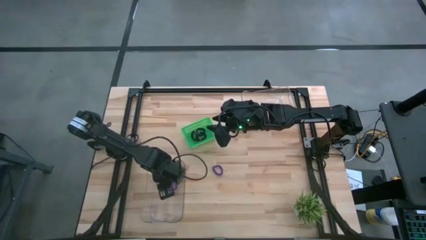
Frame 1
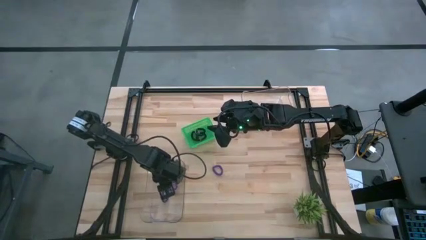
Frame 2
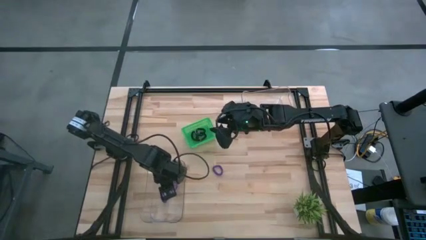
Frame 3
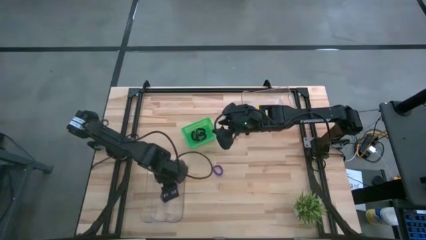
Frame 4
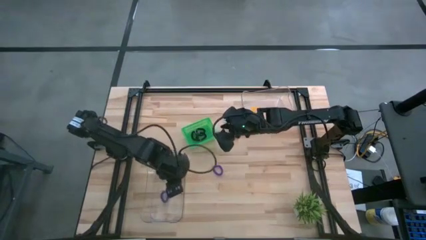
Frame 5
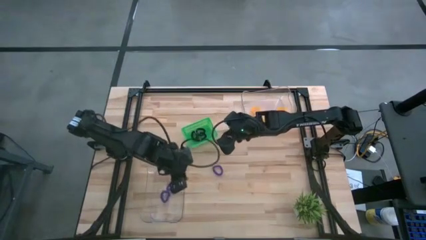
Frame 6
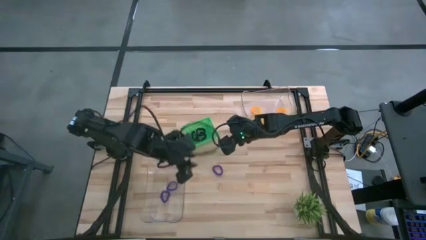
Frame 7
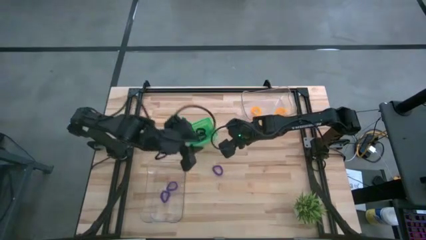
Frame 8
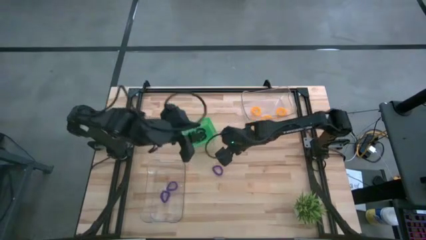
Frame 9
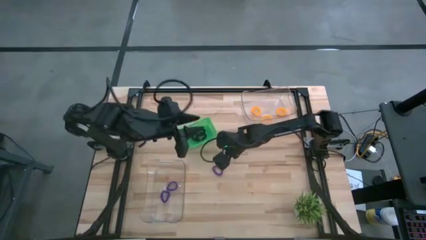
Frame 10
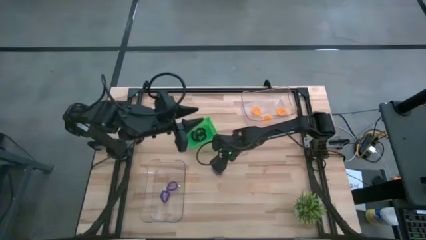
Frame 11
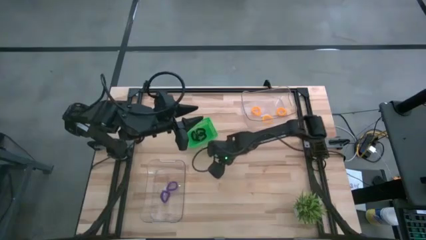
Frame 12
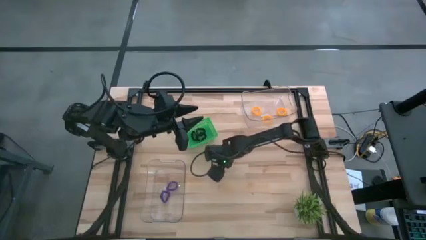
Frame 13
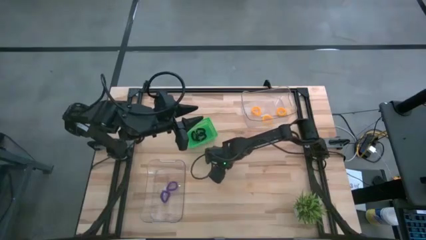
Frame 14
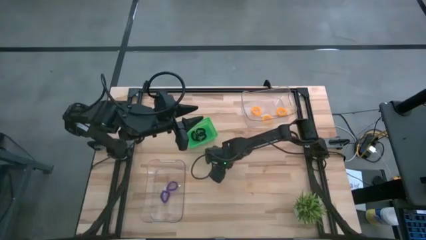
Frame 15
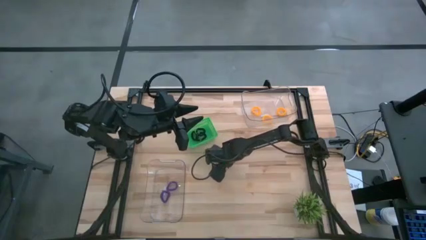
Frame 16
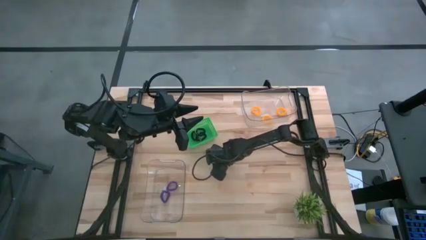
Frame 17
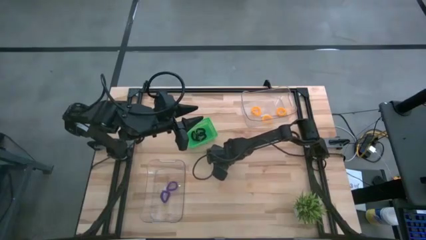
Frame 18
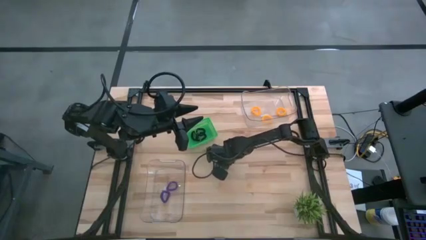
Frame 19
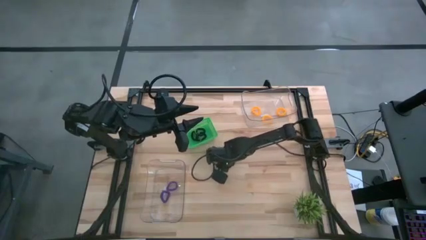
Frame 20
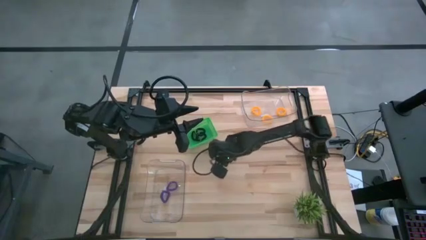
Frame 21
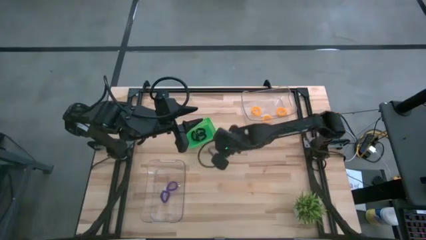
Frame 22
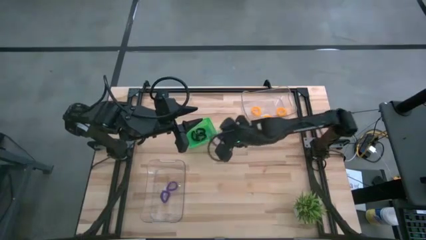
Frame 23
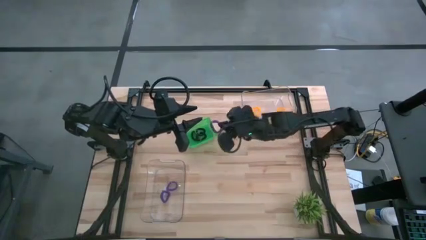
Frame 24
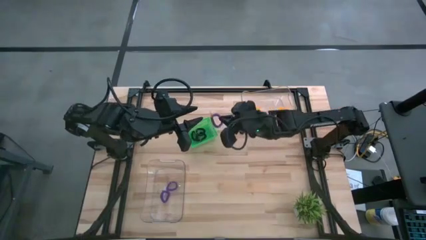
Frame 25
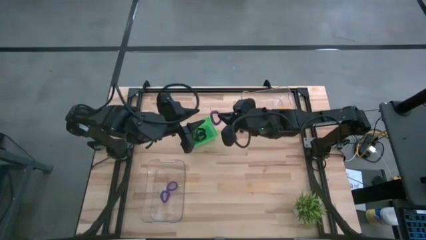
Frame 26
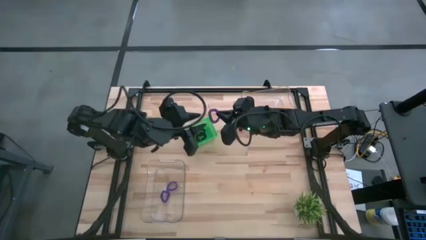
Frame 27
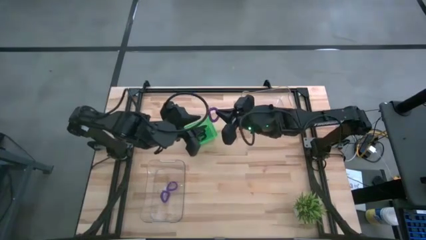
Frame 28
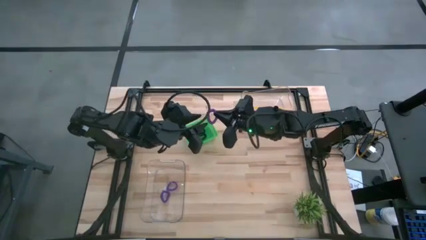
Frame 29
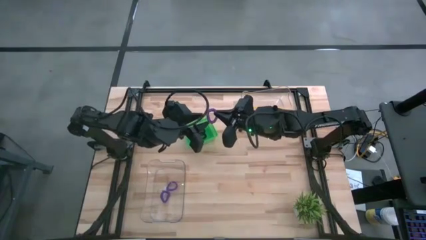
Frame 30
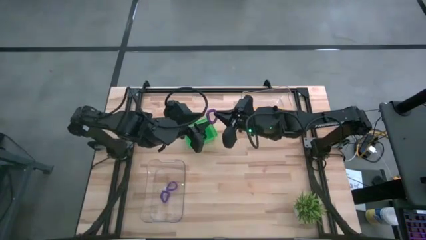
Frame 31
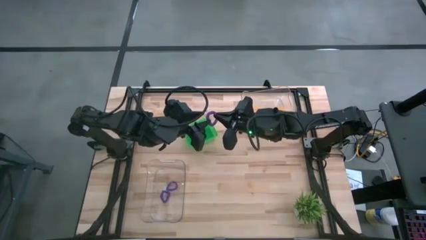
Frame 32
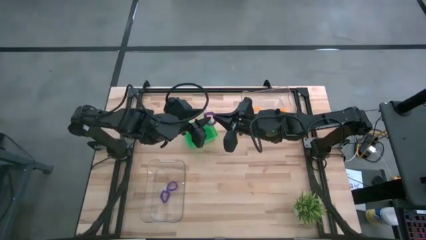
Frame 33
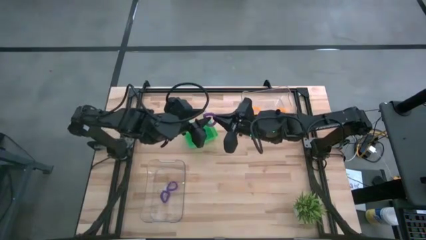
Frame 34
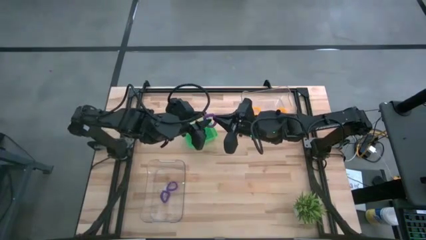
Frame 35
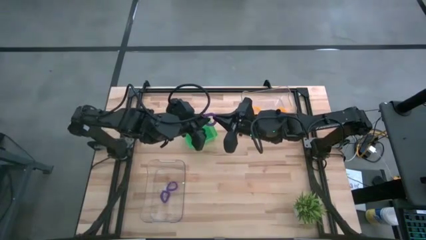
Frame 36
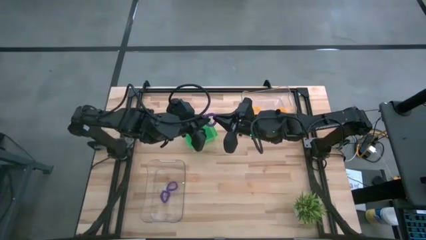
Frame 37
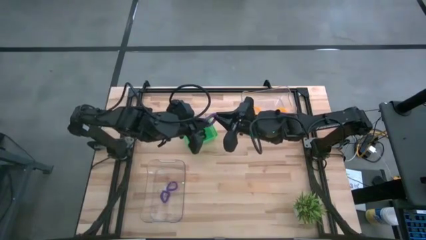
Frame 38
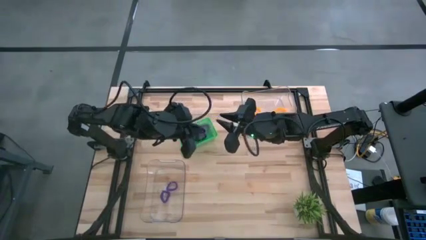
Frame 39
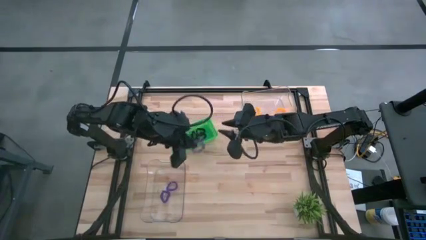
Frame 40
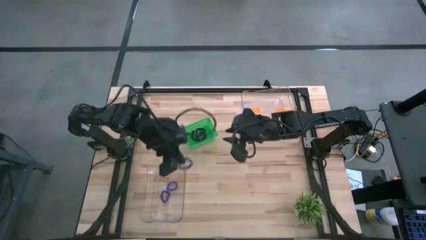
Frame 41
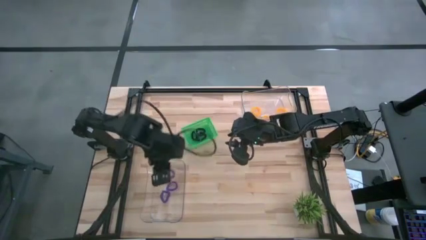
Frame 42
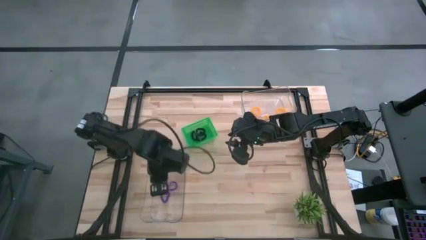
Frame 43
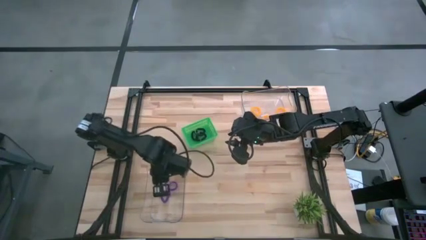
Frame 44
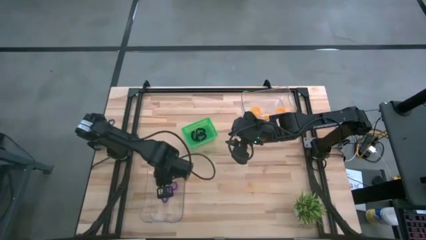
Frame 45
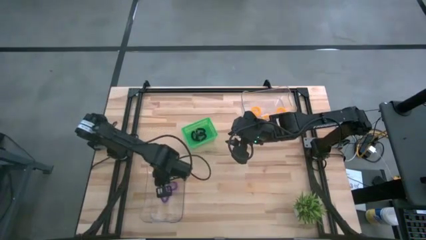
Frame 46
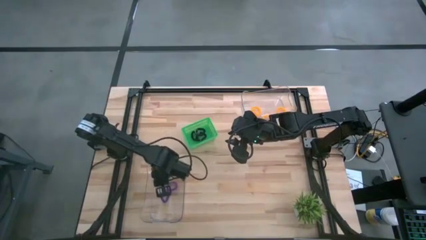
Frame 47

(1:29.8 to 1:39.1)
Task: Sort spring keychains
Put the purple spring keychain into the bottom left transparent bin

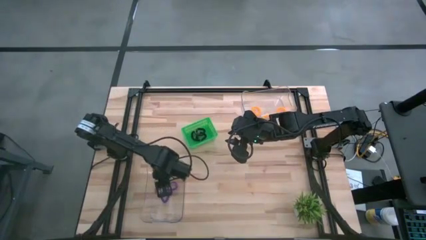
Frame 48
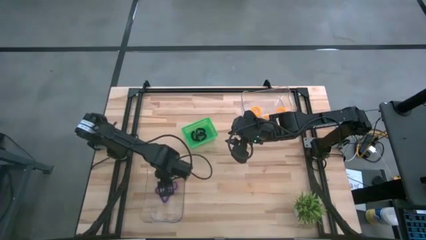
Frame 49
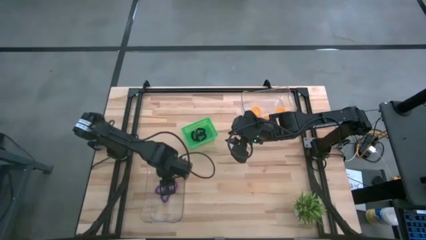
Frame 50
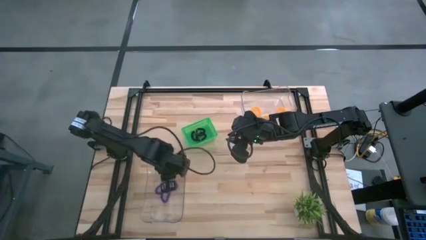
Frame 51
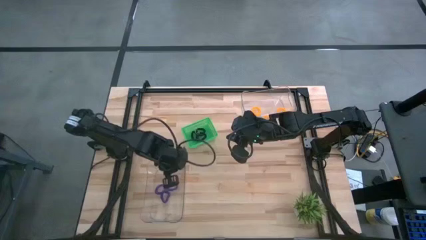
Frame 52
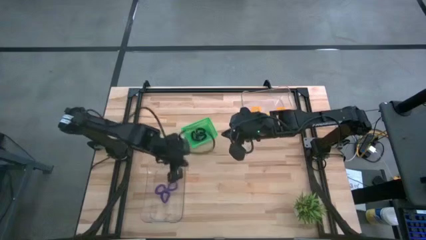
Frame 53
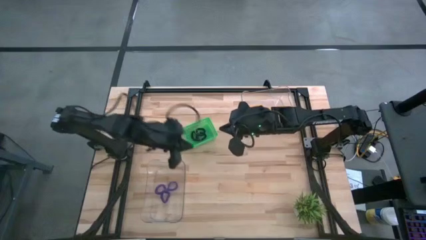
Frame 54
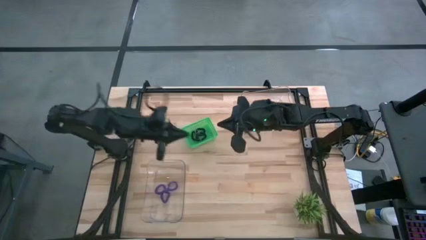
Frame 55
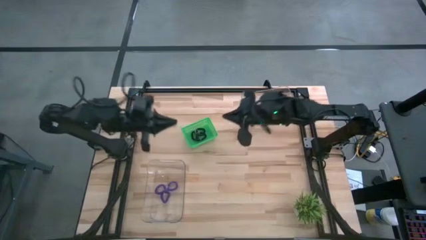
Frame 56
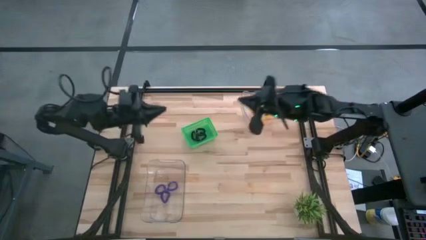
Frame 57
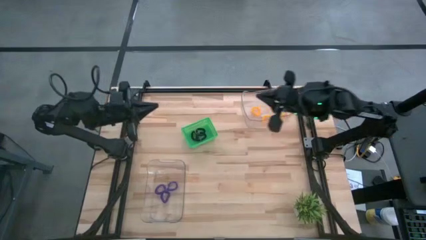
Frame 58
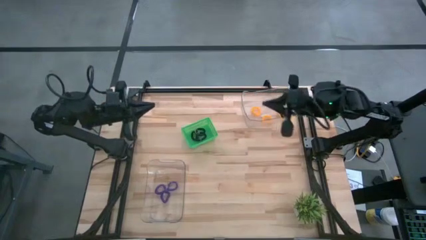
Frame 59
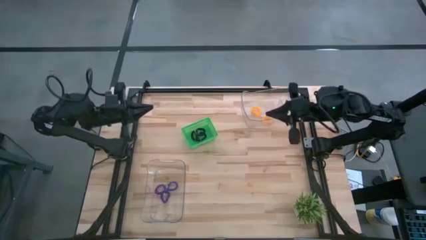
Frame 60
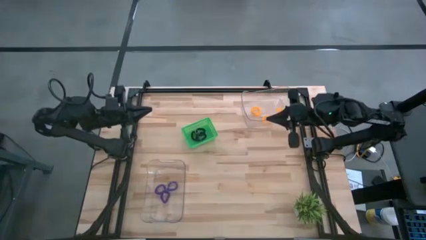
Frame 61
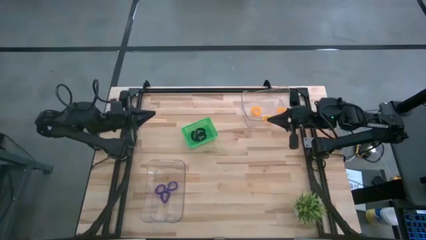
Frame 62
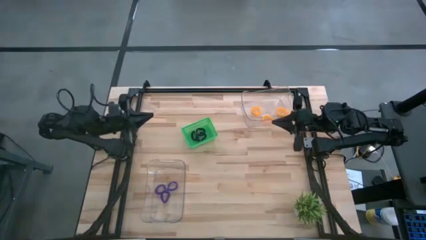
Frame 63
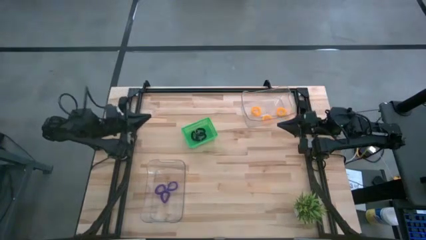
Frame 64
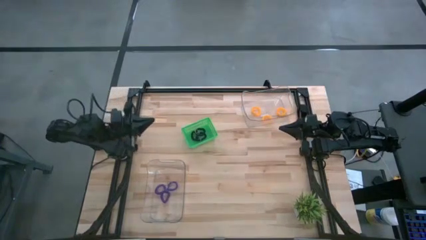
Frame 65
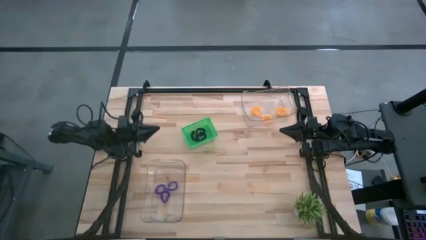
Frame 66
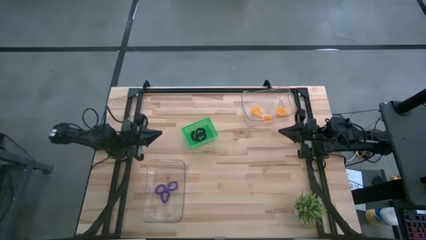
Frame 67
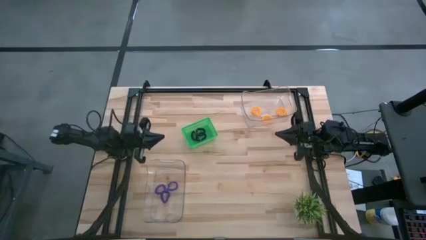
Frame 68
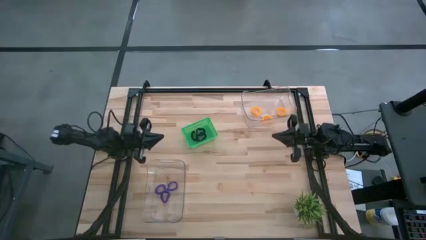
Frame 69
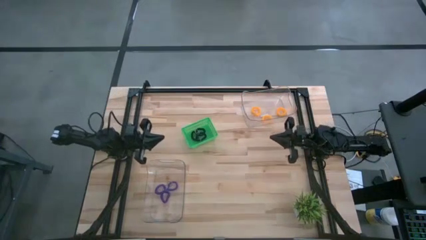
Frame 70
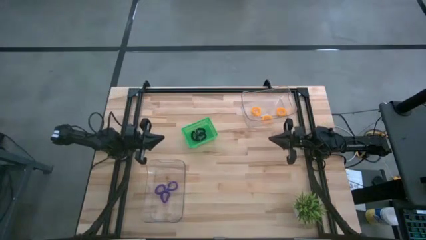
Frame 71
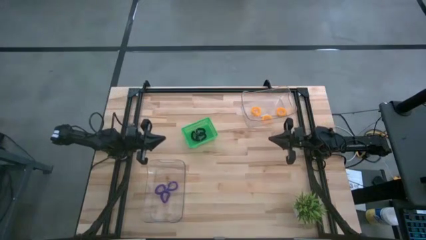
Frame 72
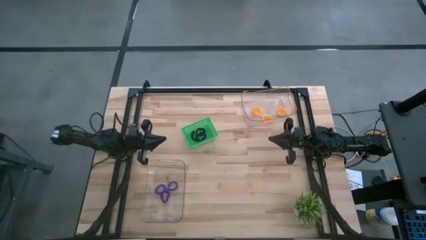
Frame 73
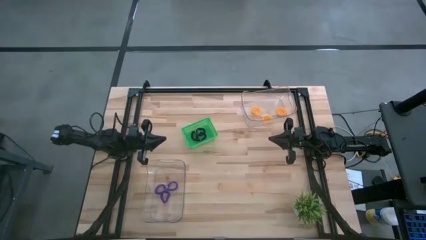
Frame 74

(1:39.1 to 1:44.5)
Return to Home Position
